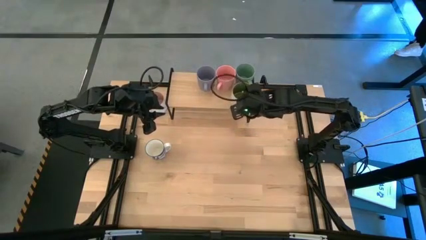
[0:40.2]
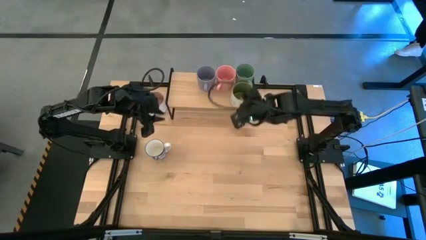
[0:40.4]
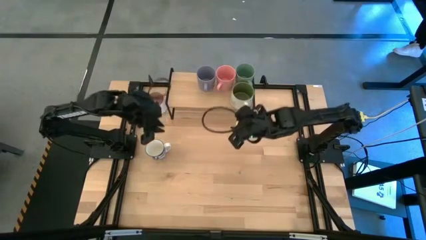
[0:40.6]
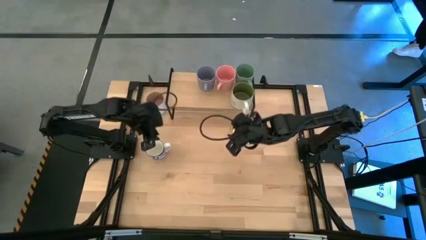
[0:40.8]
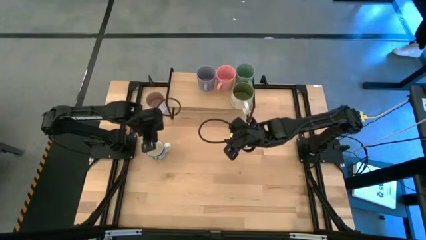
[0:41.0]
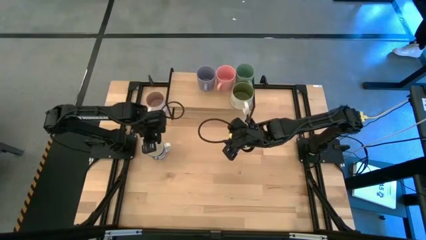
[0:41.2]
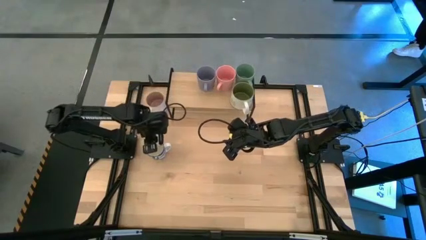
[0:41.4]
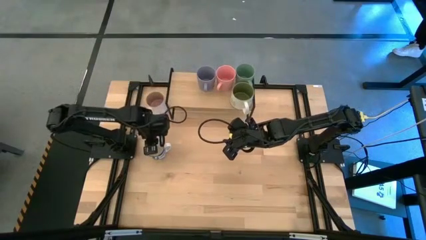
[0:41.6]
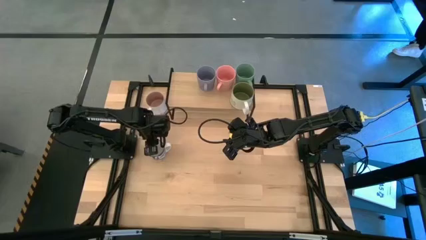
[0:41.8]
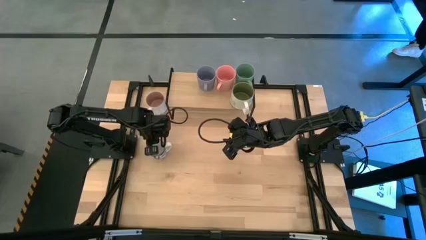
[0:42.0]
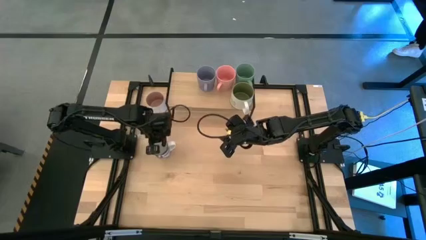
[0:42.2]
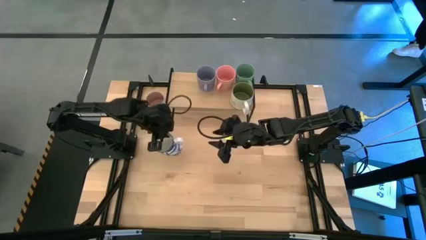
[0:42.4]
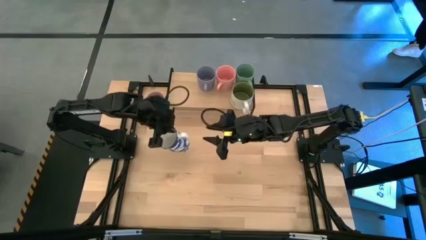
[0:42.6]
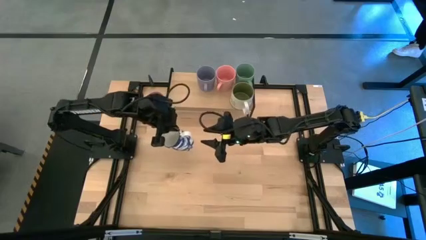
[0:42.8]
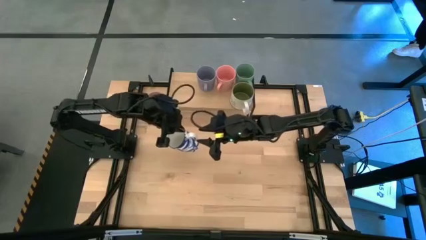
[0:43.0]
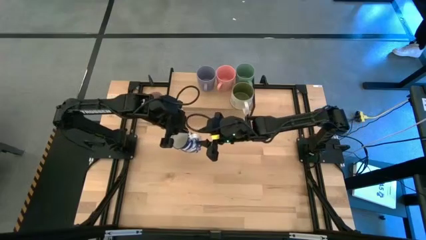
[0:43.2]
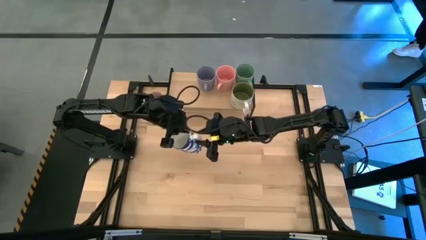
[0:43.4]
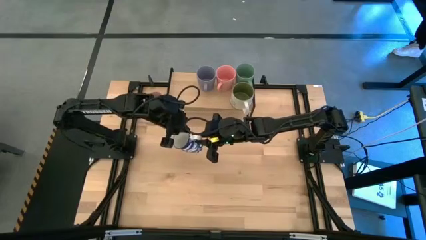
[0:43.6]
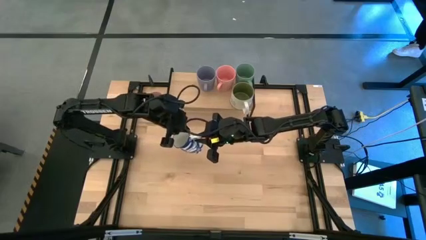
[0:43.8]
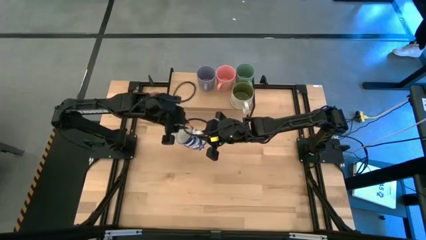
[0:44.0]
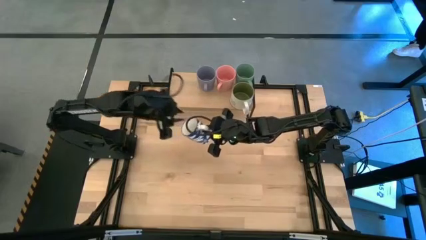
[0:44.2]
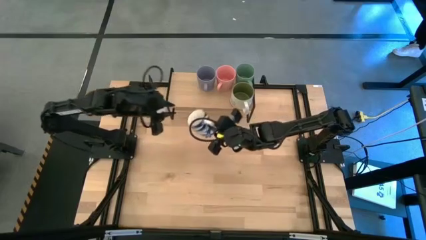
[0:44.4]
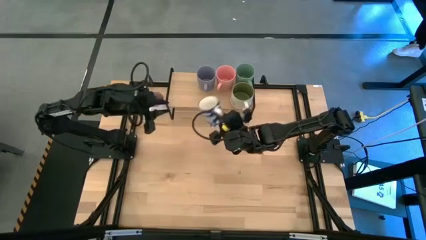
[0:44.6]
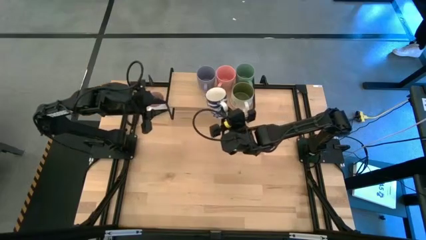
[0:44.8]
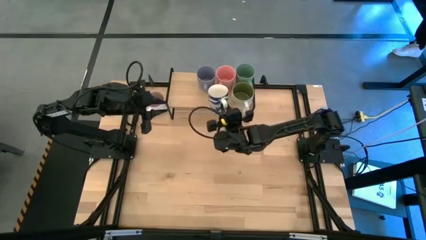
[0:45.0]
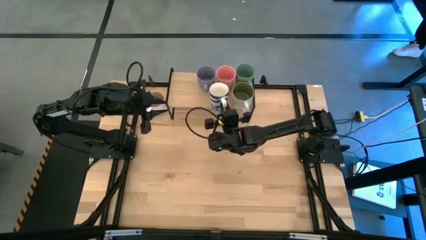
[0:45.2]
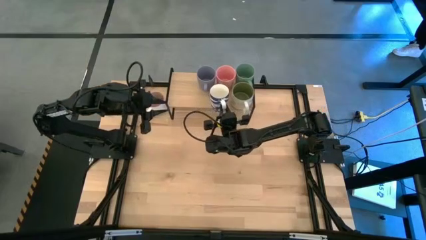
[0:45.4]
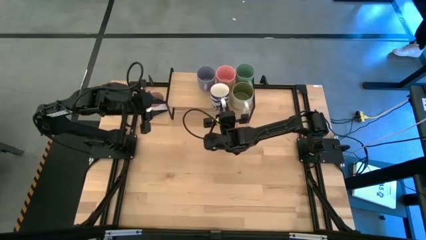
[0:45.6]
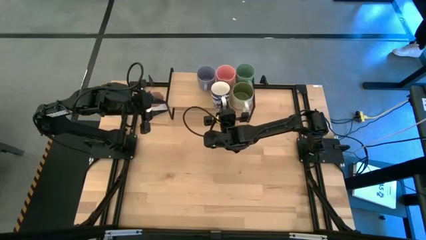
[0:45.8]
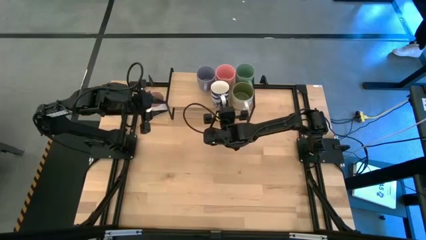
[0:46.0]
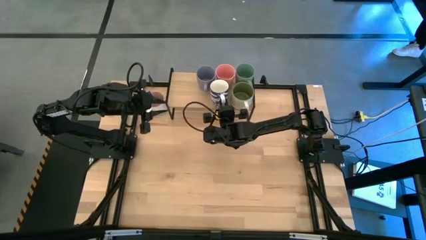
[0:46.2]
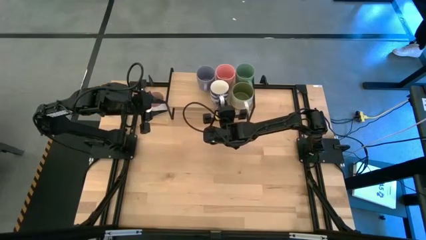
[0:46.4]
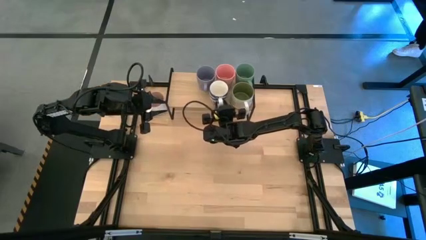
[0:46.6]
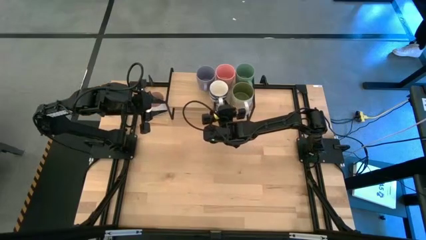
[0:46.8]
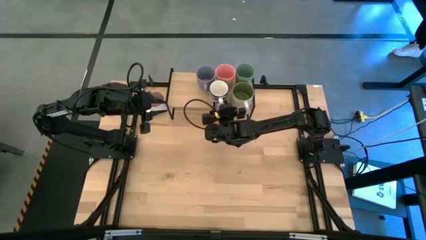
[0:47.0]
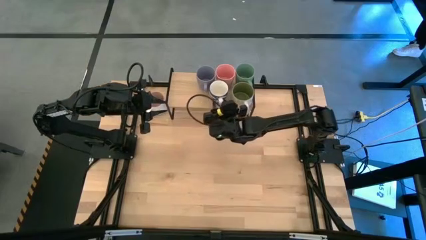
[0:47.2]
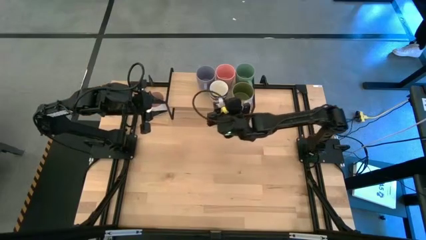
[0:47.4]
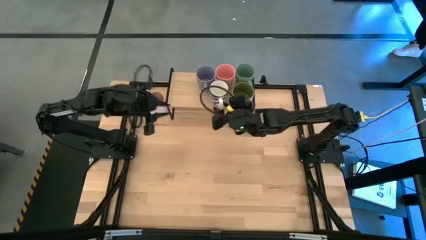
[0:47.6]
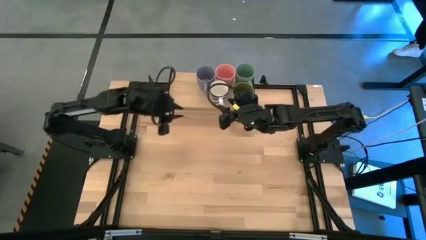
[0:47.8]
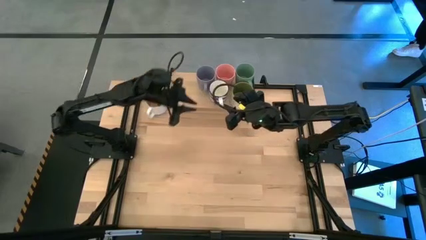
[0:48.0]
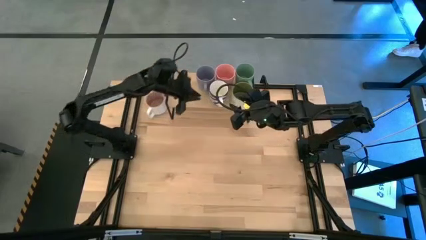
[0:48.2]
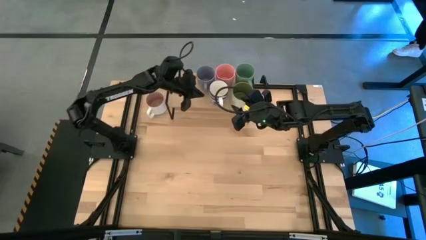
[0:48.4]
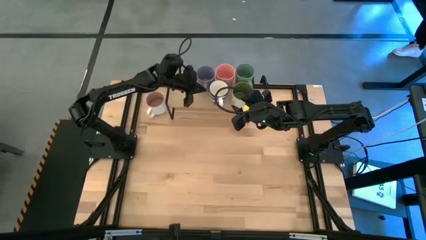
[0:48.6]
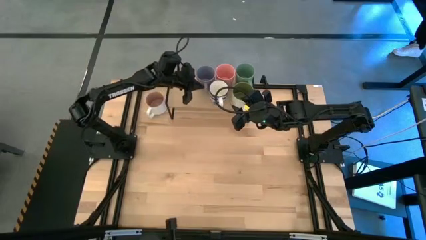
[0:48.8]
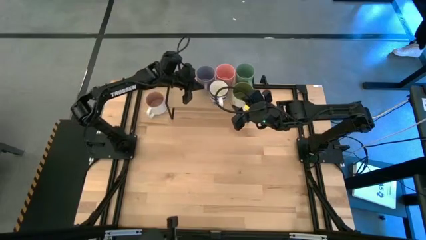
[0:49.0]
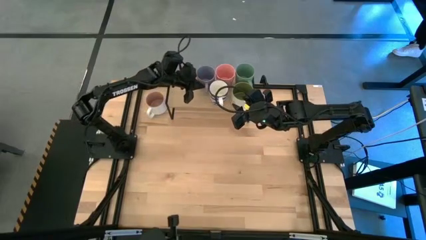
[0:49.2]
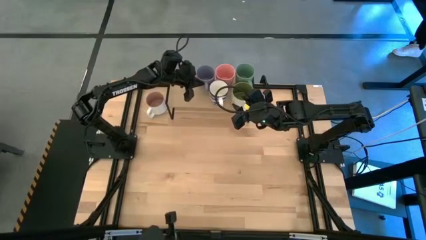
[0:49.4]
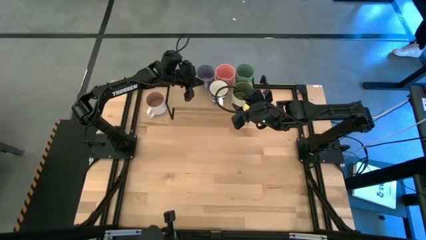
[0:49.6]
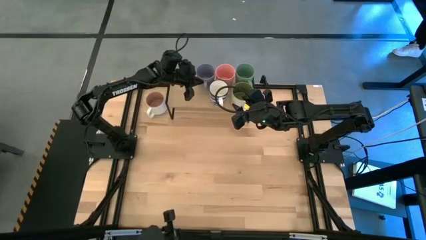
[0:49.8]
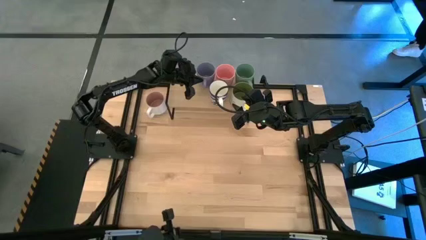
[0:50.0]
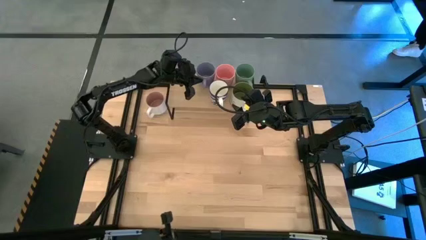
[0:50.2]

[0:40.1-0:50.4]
Task: Place coffee mugs
Put the blue mug on the shelf

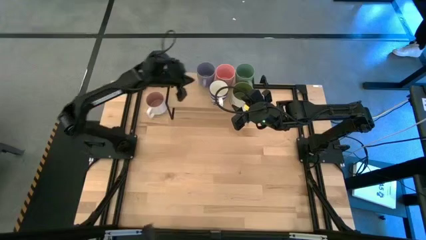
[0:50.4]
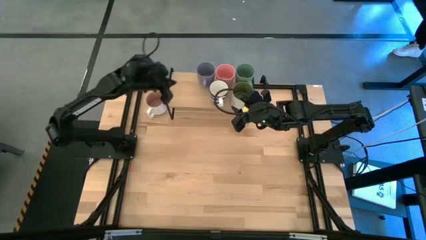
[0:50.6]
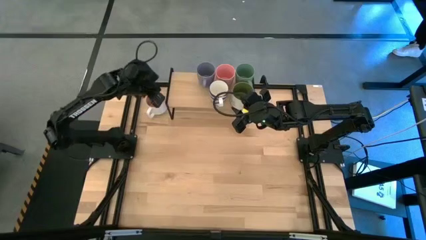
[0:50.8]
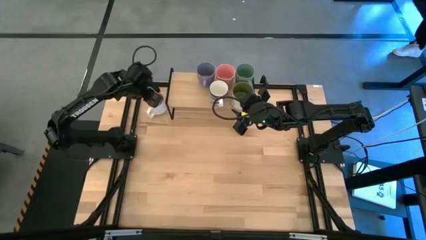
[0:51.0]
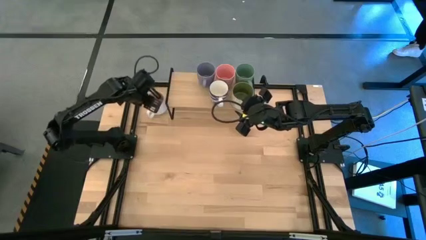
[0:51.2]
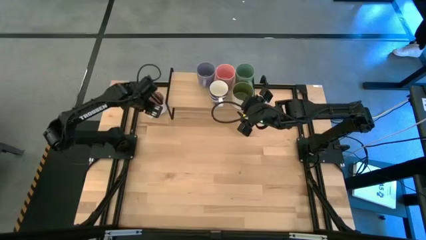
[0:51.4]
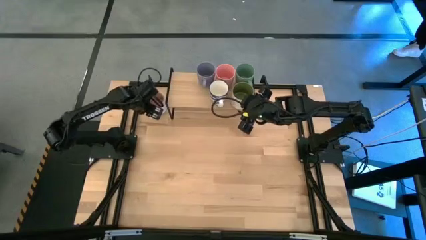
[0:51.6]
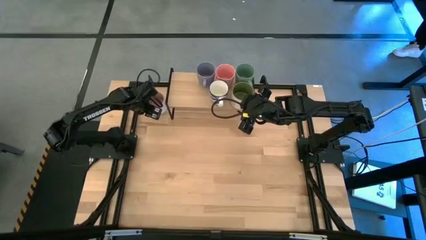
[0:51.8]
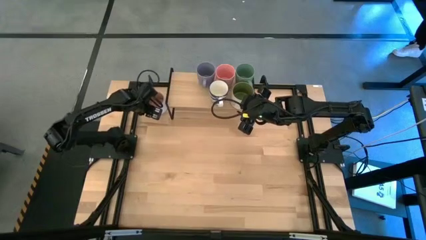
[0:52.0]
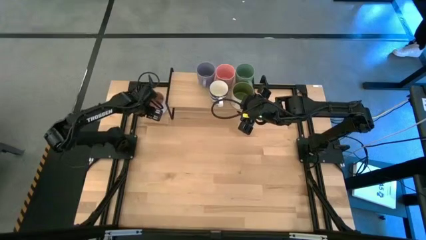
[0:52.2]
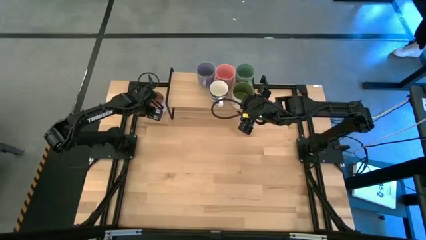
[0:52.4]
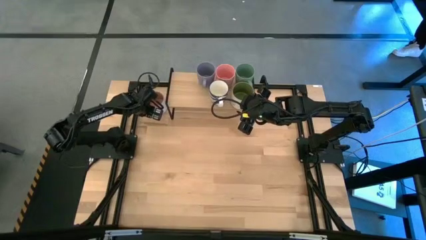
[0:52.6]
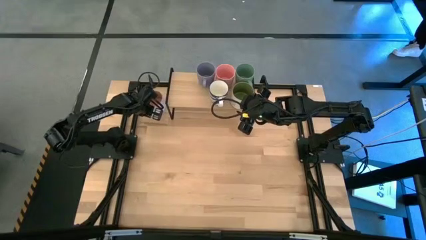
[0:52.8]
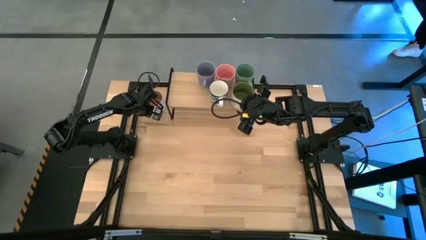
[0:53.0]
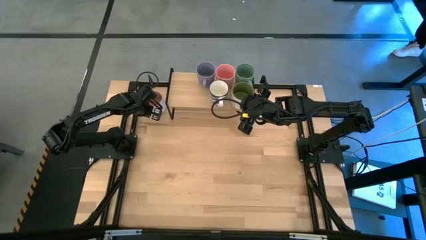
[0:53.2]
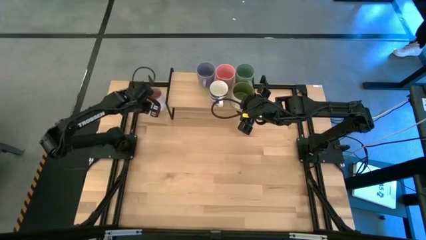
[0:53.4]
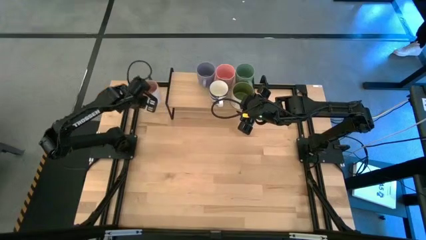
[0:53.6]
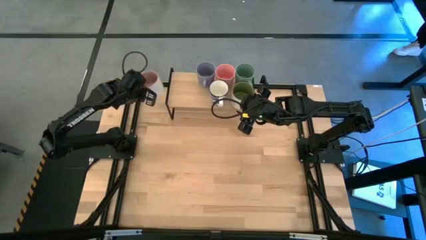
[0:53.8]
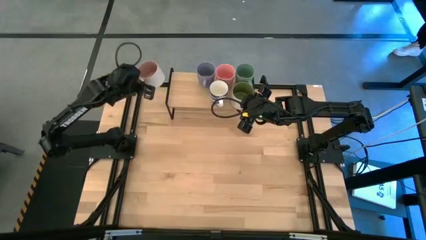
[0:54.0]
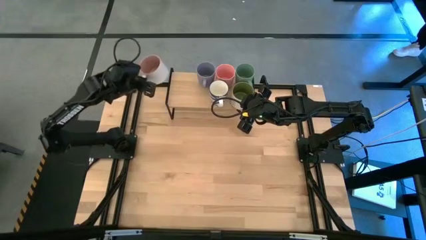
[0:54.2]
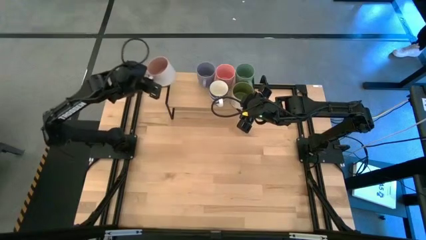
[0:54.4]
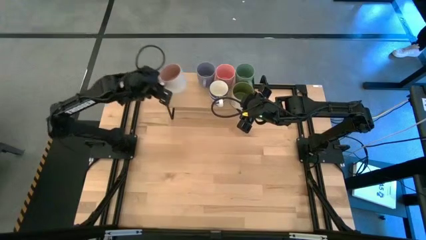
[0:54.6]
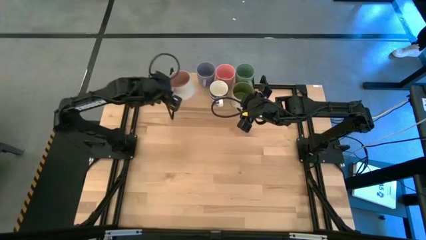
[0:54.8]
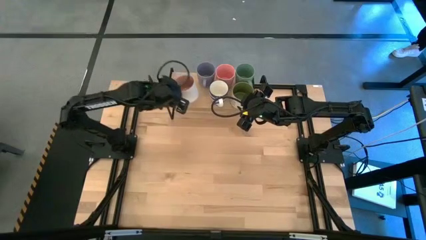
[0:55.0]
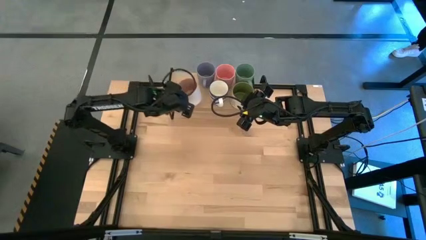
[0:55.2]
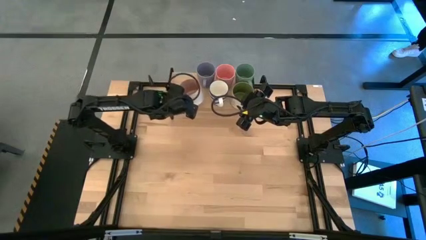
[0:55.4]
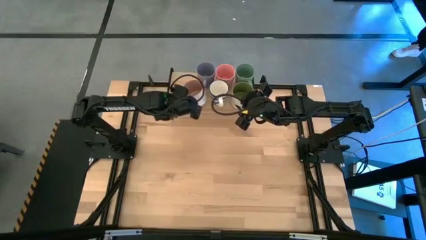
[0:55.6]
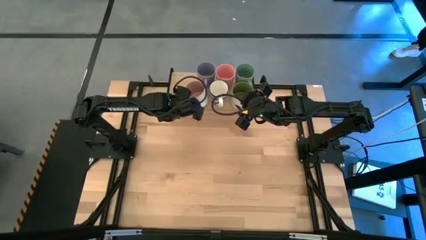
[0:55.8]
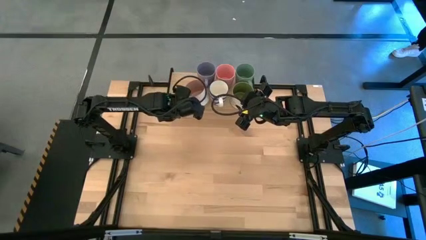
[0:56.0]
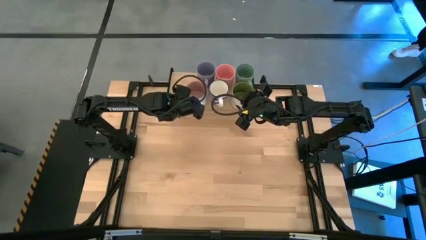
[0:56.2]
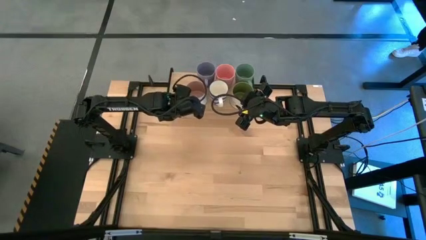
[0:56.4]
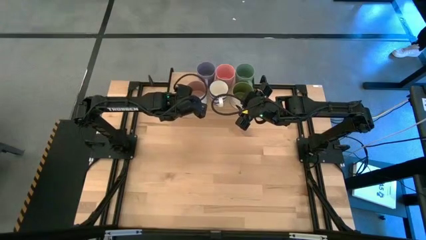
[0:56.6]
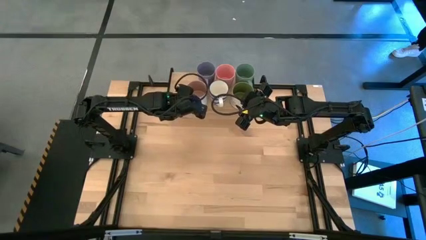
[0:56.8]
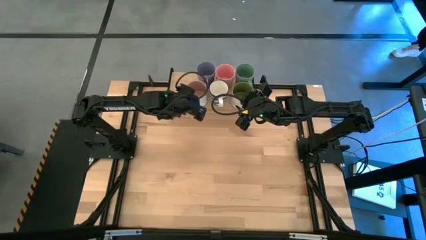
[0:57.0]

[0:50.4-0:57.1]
Put the brown mug on the shelf
